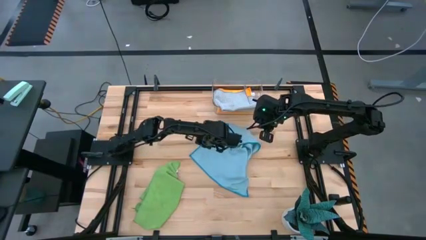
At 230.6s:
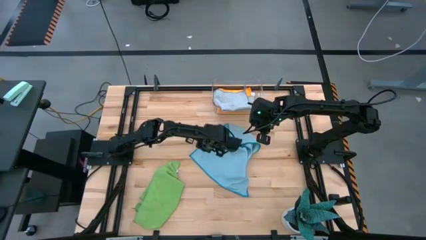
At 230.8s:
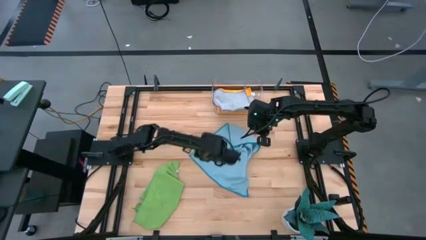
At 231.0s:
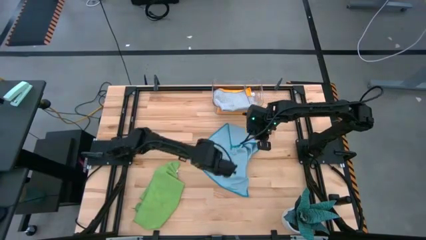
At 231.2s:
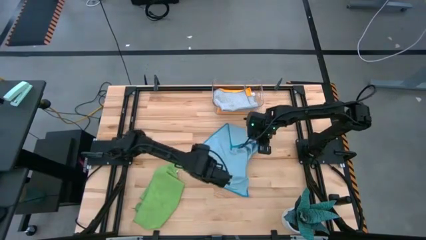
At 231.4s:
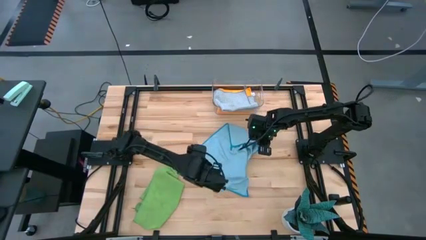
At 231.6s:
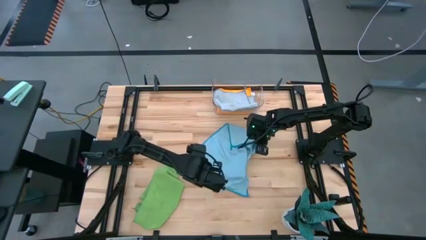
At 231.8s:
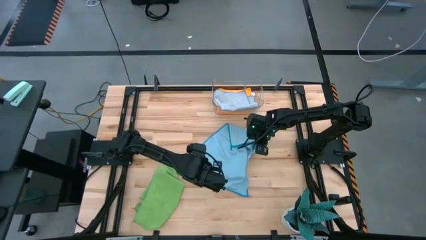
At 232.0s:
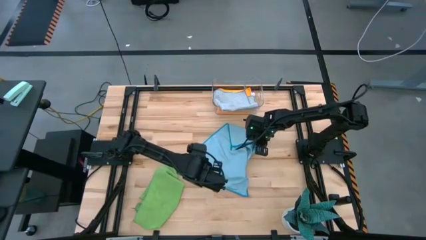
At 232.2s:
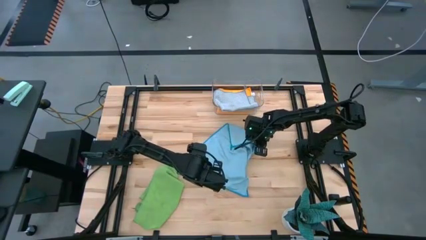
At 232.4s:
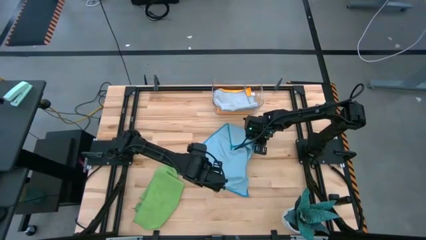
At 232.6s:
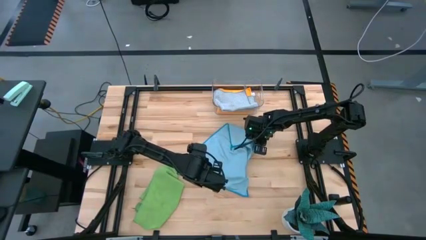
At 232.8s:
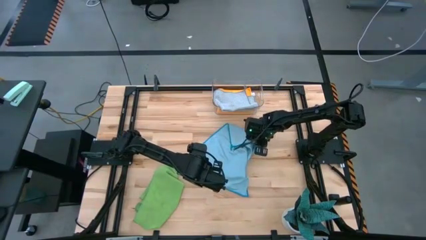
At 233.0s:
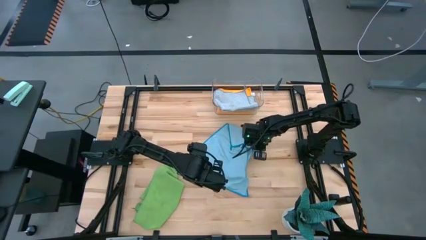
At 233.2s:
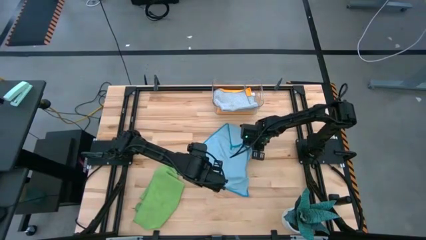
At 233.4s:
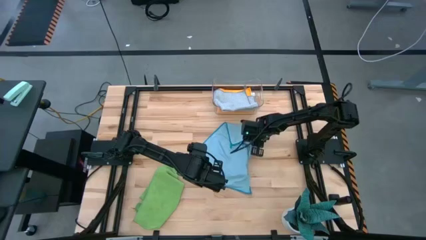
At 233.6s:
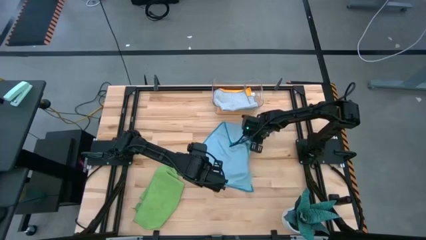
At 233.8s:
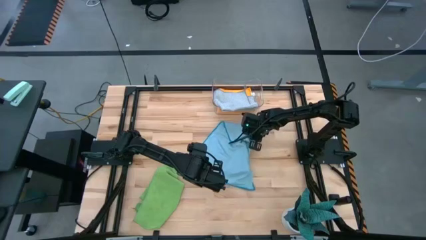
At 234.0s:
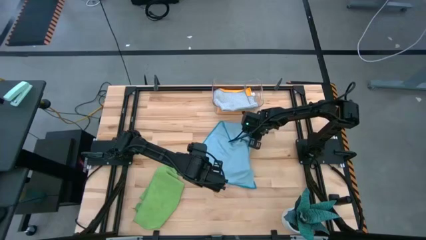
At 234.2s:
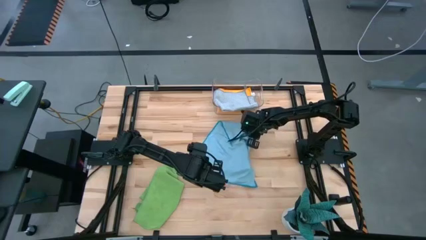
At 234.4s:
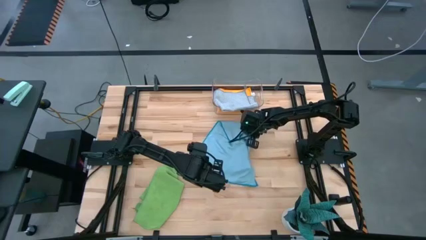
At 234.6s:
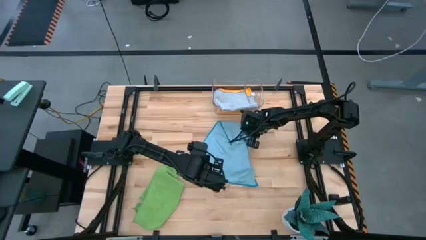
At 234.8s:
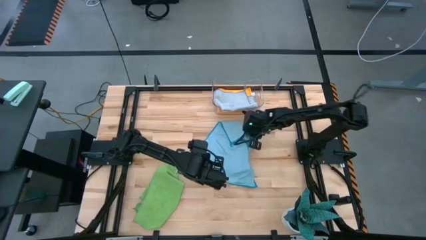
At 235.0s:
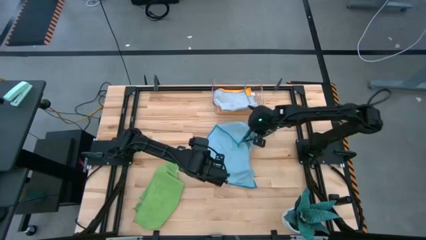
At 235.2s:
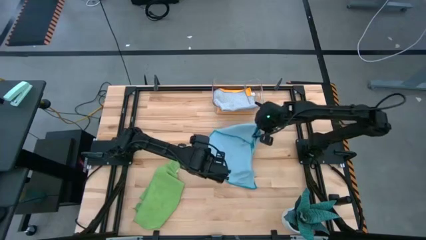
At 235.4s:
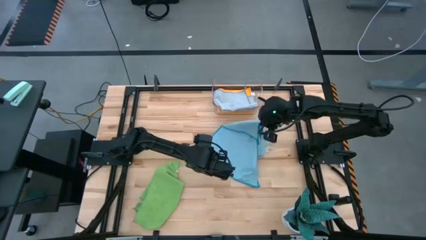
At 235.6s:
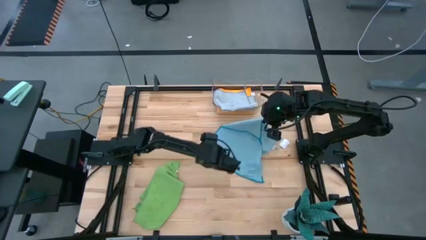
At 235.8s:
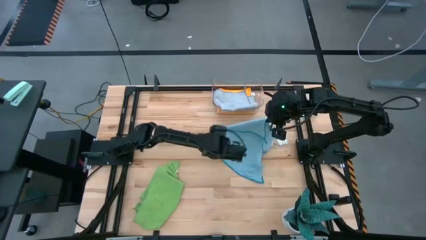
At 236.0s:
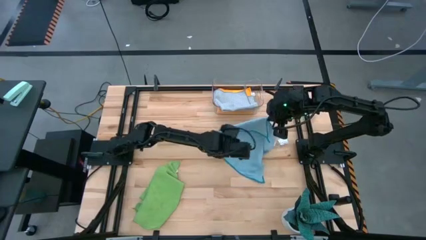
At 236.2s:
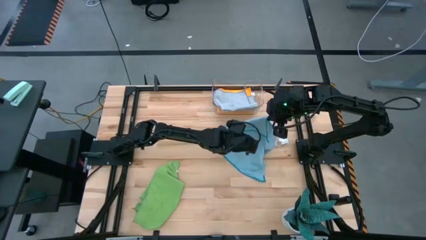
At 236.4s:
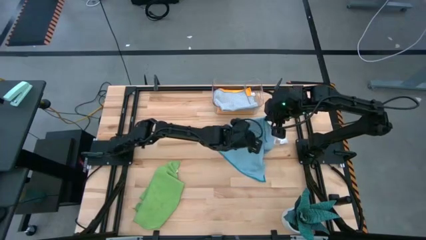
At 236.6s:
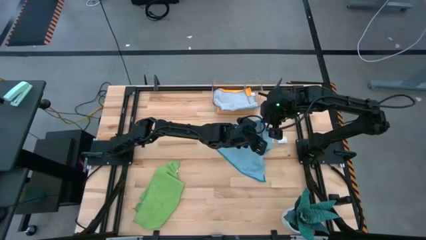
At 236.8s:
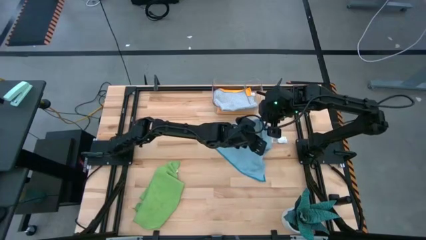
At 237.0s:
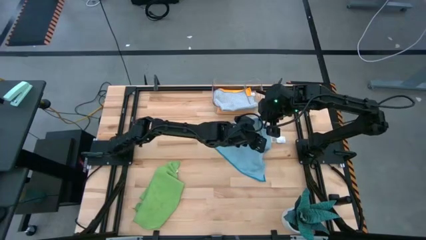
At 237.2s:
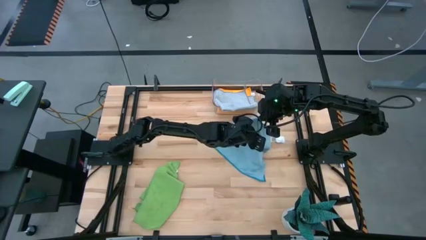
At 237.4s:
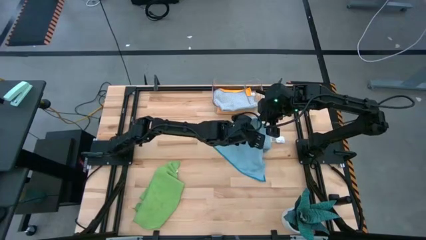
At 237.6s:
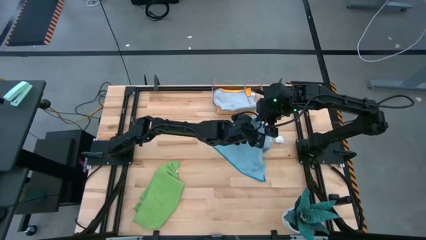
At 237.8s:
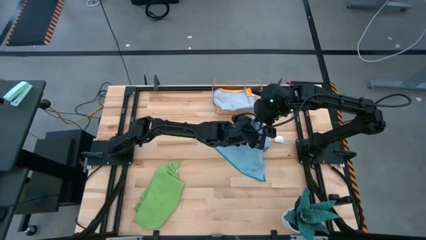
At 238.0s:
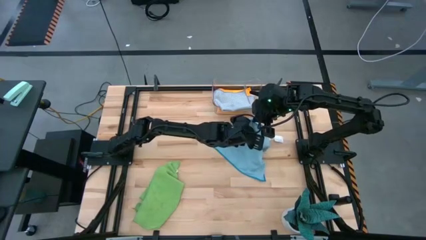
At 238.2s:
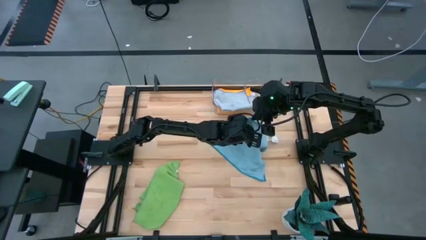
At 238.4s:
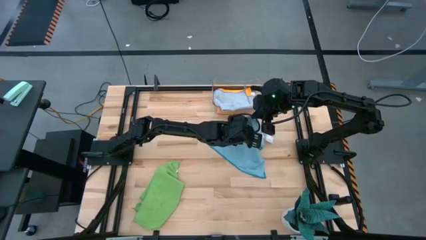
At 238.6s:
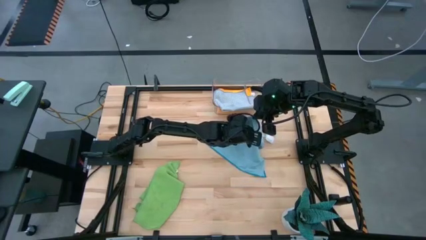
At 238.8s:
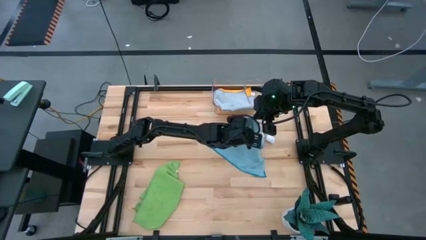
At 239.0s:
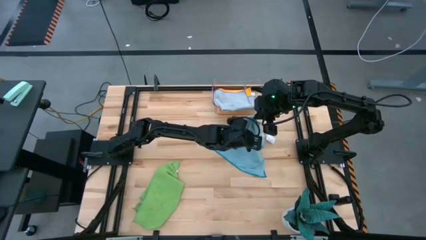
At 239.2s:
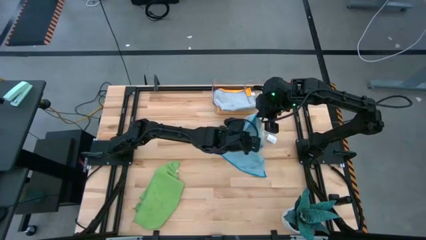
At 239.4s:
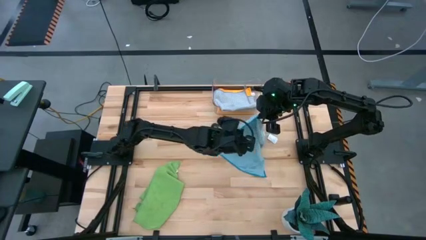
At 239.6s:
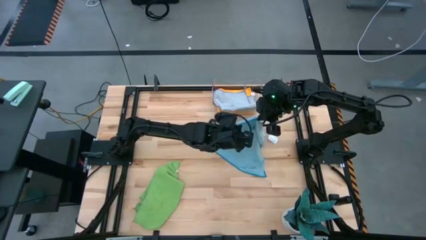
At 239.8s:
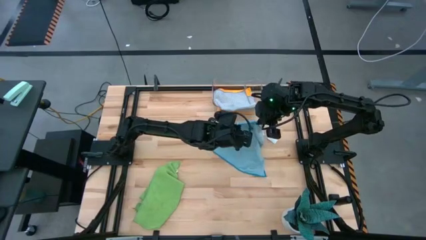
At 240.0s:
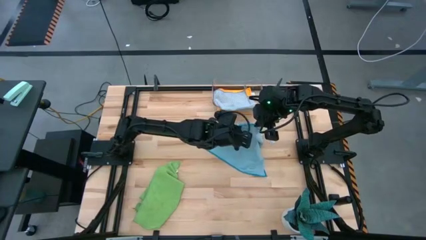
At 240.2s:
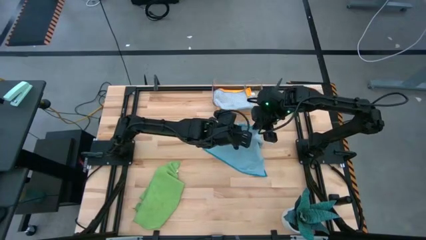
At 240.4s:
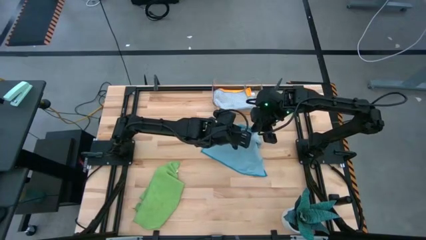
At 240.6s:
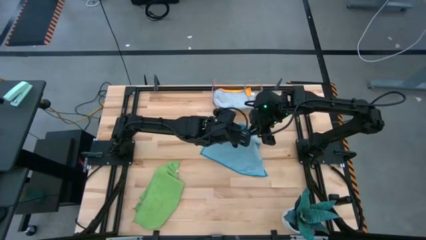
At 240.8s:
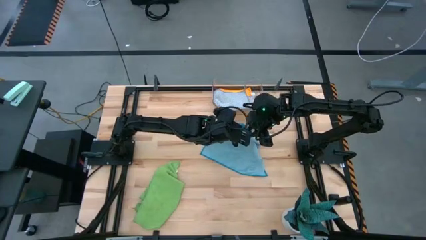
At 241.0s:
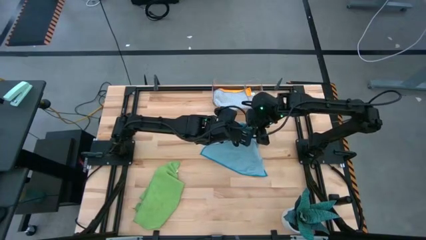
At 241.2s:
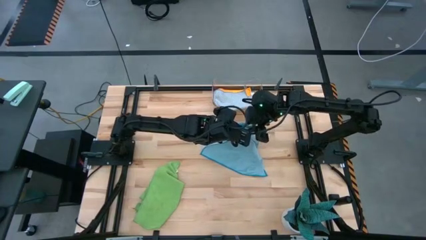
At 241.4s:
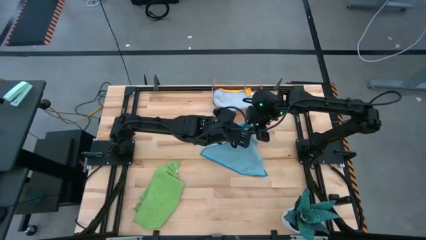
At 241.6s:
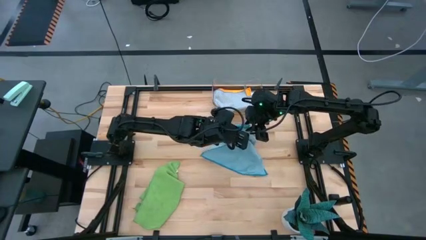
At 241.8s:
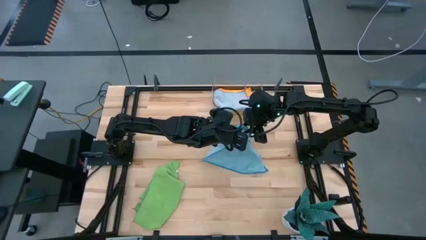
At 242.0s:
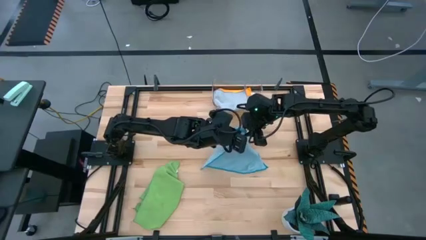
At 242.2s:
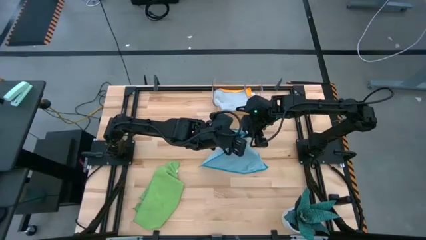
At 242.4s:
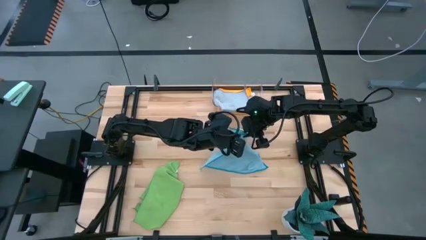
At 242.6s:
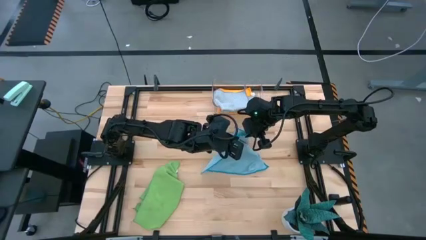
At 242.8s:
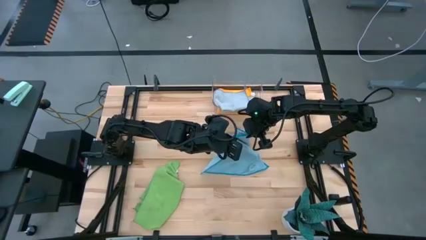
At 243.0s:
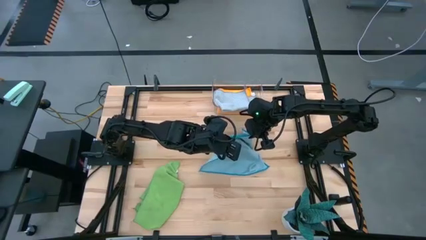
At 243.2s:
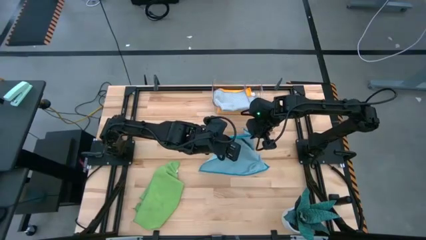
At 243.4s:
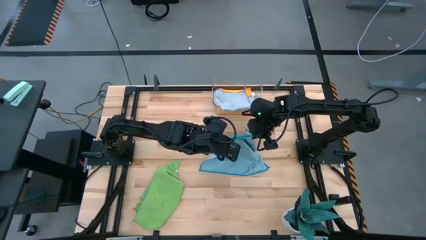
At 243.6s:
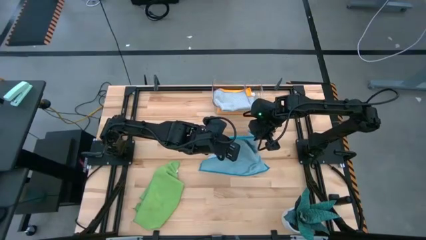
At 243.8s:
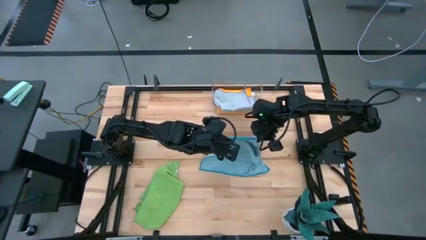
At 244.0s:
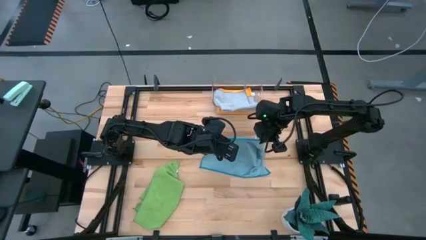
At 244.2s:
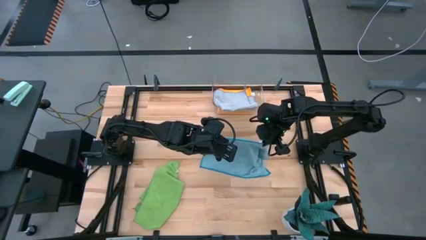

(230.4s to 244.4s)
Task: Fold microfiber towels
Fold the blue microfiber cloth

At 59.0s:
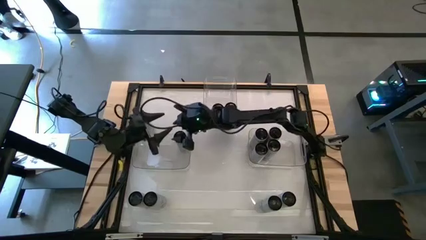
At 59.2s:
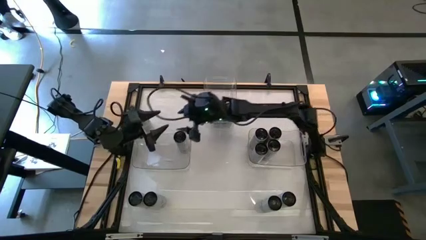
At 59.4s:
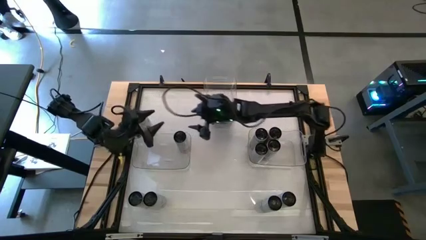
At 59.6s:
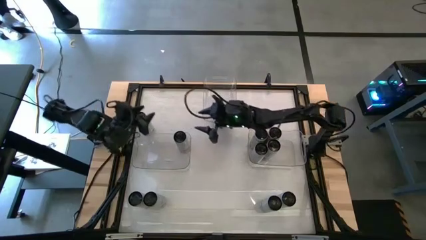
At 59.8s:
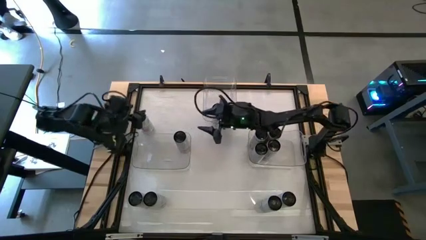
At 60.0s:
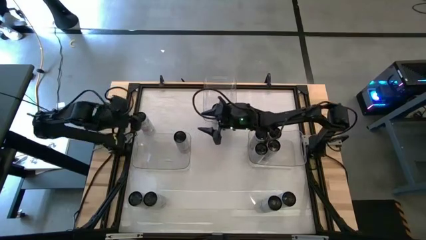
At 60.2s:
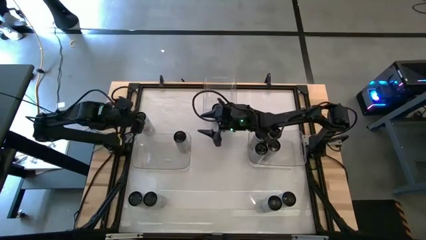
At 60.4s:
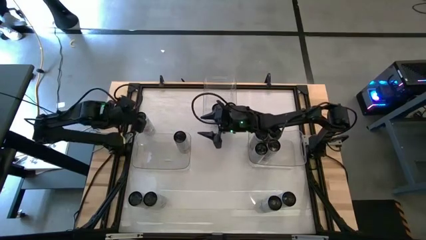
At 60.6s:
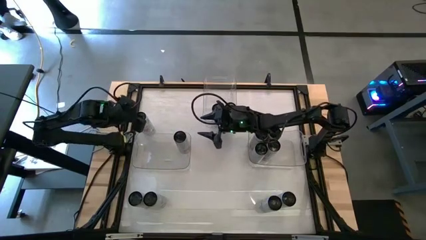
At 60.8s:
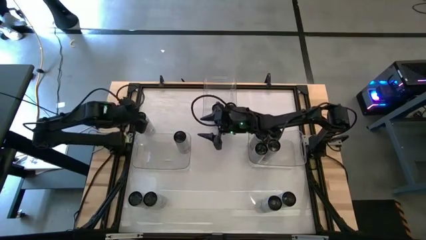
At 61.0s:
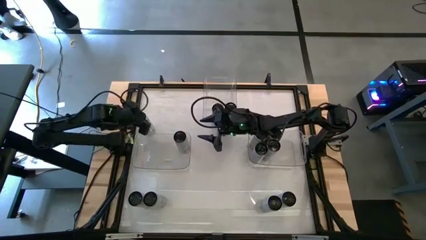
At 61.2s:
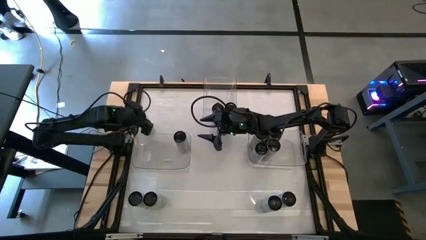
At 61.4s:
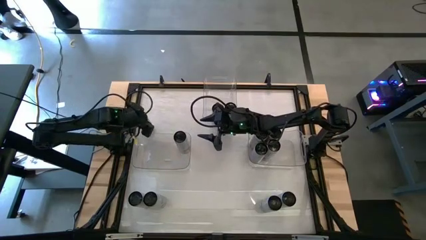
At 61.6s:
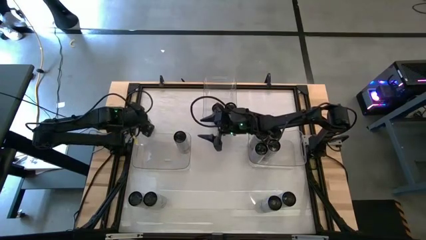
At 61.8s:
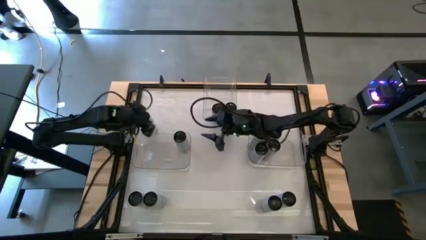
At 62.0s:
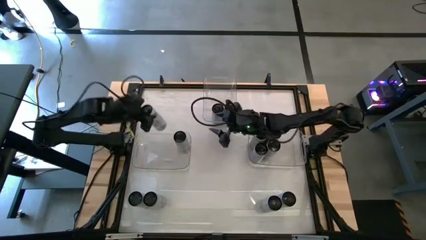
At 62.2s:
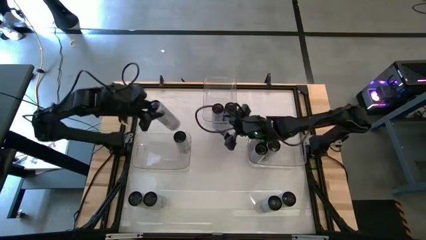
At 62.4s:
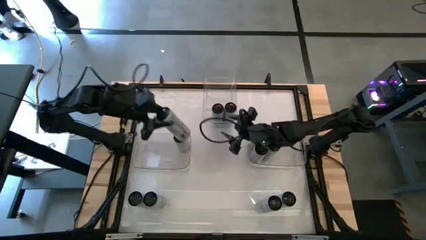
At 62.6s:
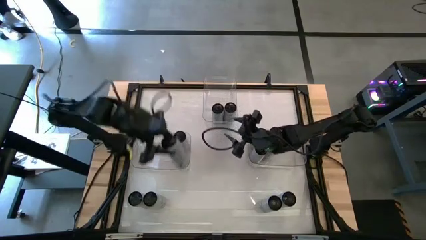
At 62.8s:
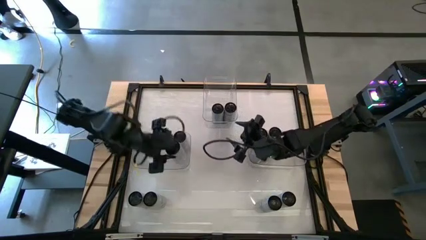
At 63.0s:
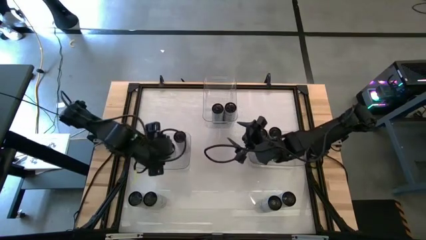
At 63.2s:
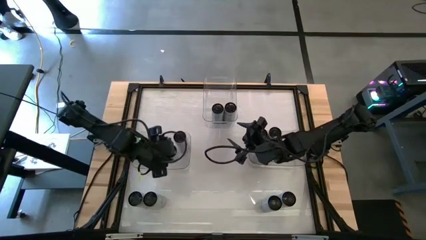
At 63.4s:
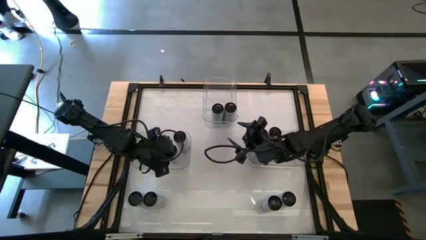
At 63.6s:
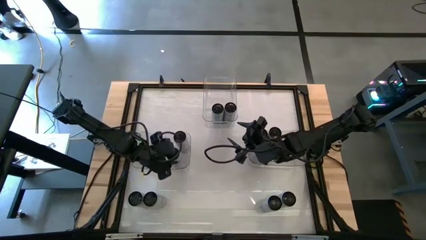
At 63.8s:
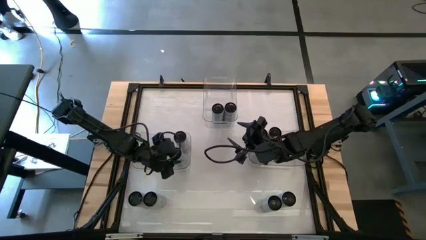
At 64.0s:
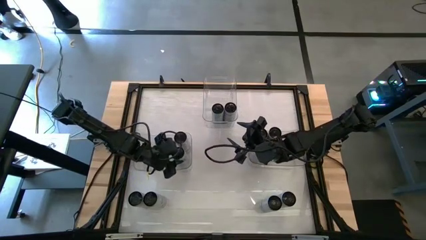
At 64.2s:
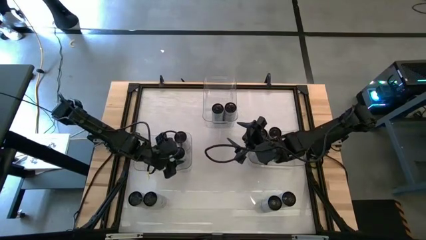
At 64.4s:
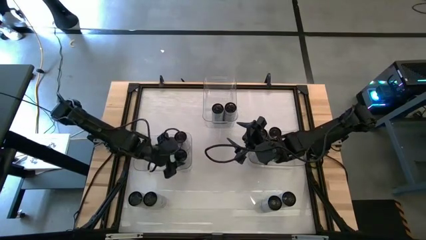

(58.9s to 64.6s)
Task: Sort soda cans
Put the top left white-pink soda can into the bottom left transparent bin
